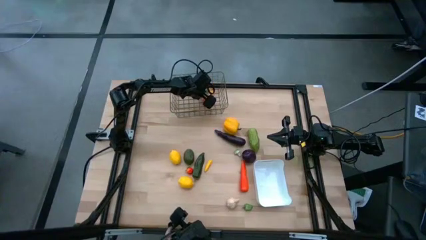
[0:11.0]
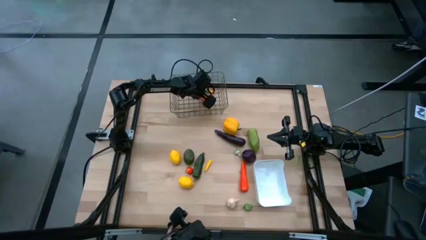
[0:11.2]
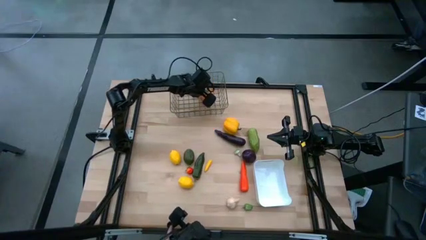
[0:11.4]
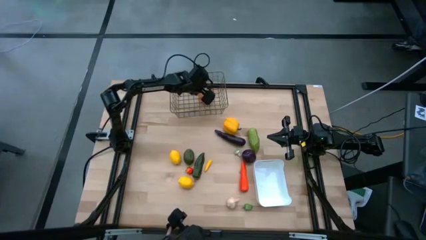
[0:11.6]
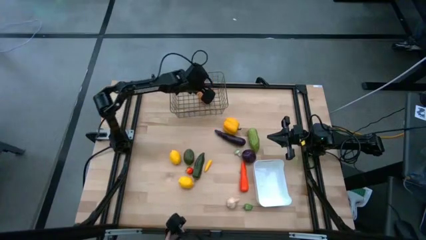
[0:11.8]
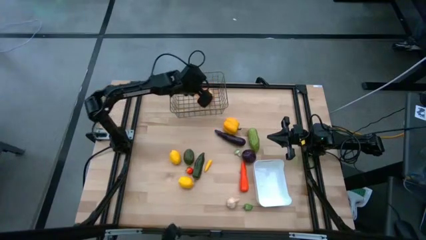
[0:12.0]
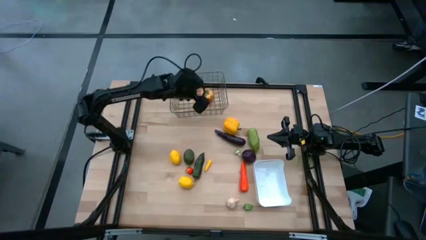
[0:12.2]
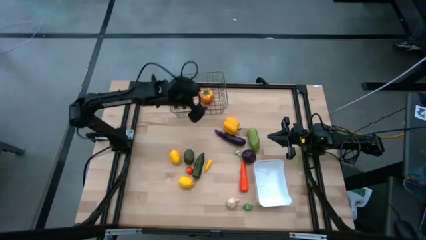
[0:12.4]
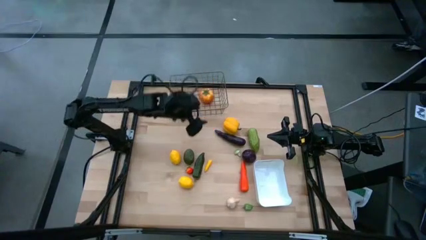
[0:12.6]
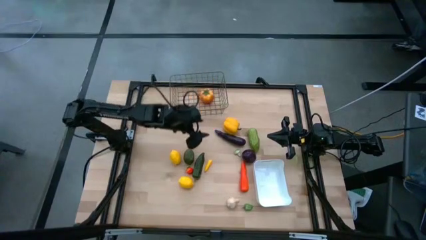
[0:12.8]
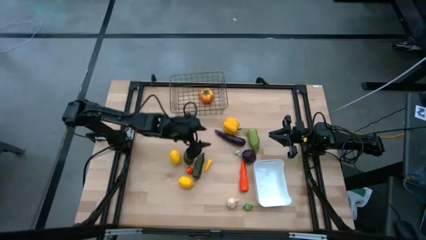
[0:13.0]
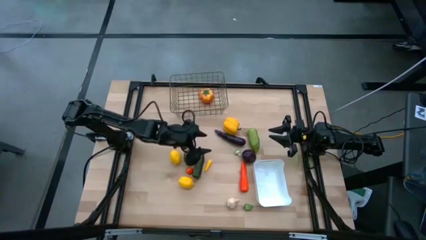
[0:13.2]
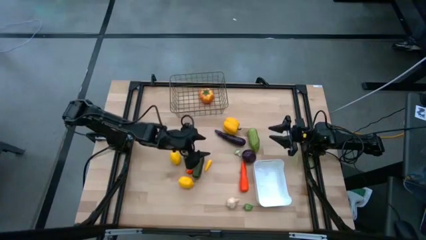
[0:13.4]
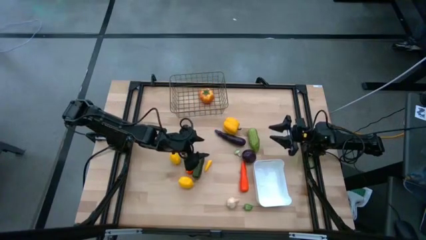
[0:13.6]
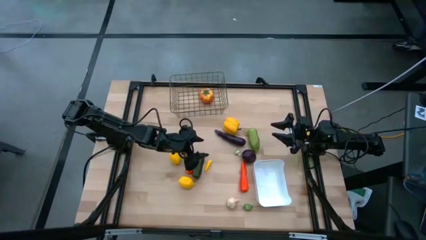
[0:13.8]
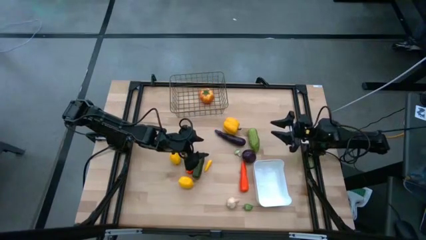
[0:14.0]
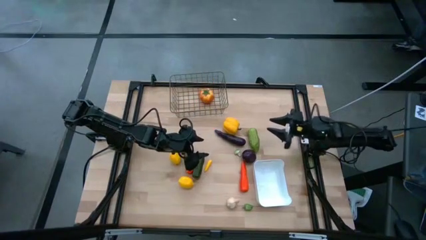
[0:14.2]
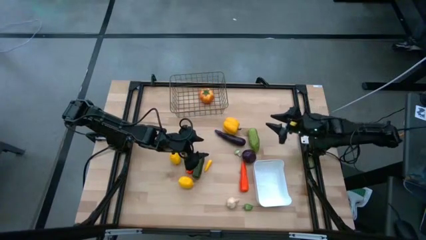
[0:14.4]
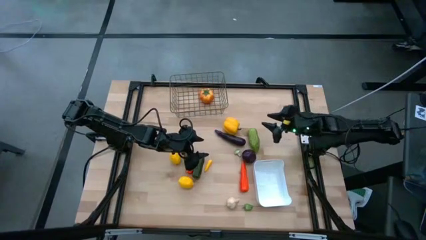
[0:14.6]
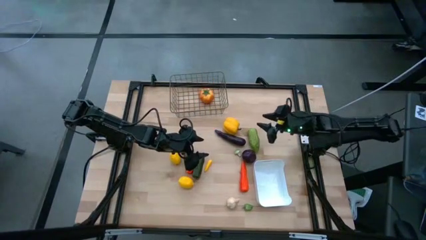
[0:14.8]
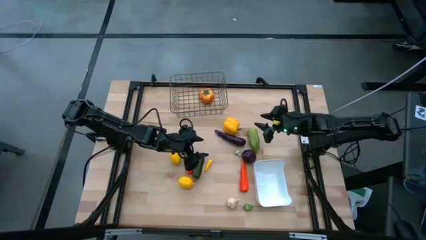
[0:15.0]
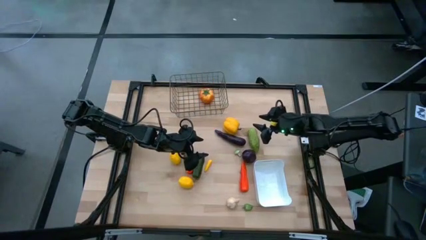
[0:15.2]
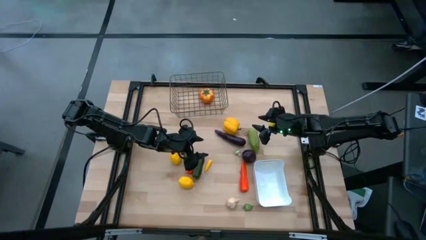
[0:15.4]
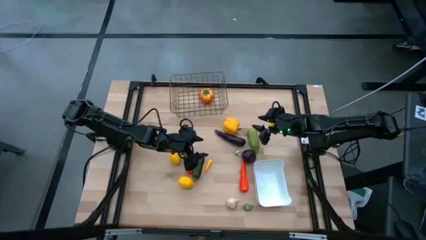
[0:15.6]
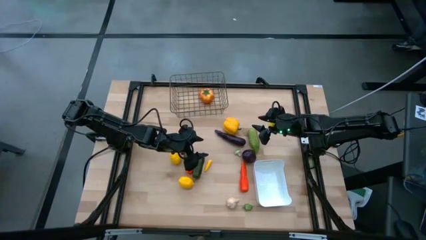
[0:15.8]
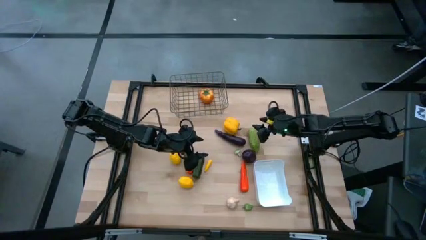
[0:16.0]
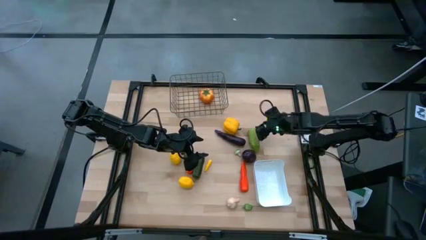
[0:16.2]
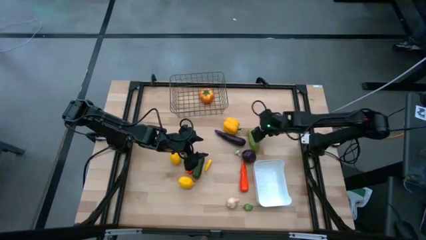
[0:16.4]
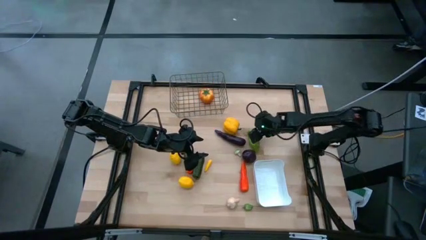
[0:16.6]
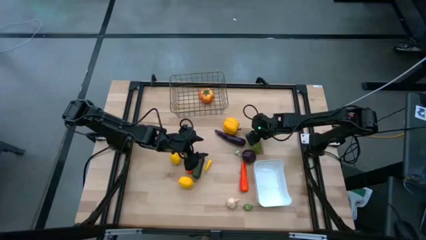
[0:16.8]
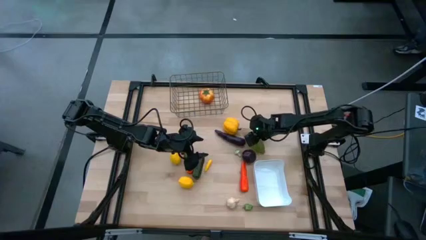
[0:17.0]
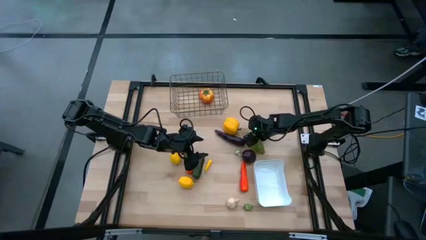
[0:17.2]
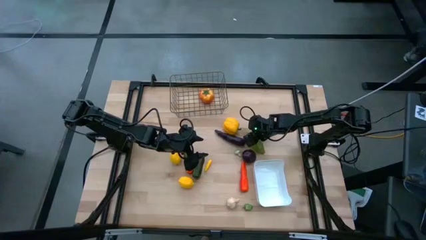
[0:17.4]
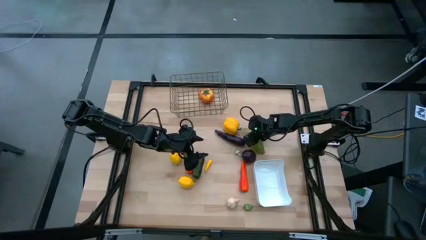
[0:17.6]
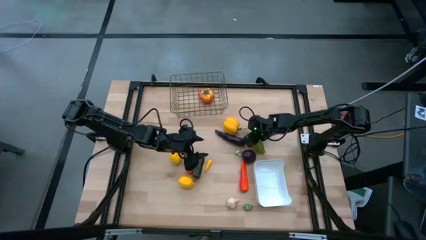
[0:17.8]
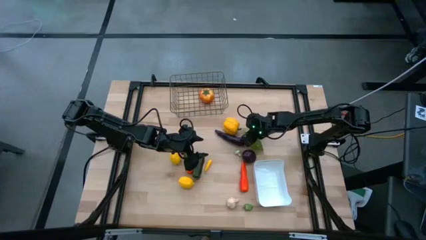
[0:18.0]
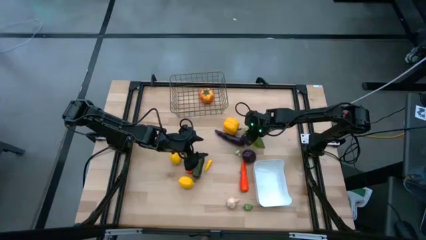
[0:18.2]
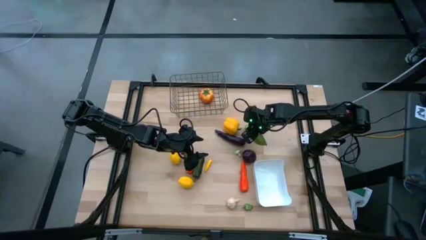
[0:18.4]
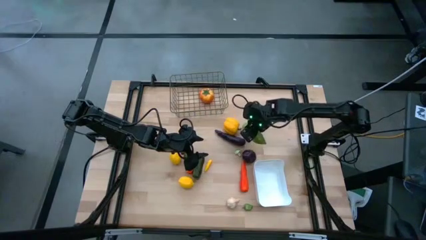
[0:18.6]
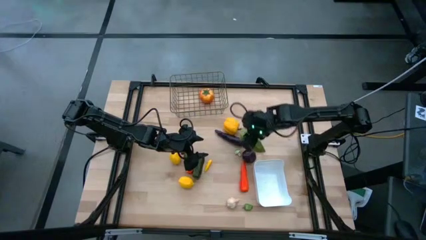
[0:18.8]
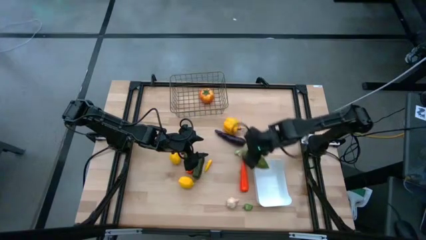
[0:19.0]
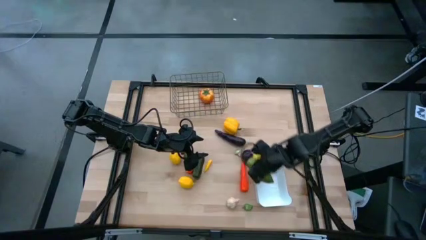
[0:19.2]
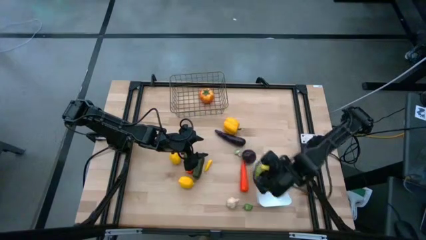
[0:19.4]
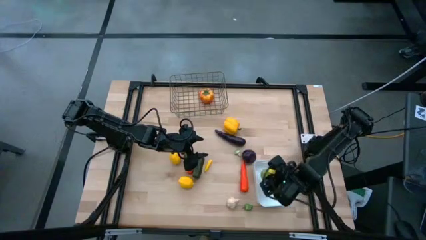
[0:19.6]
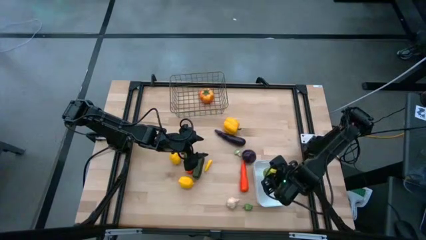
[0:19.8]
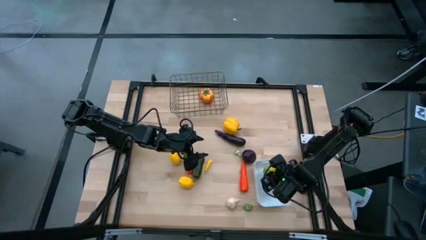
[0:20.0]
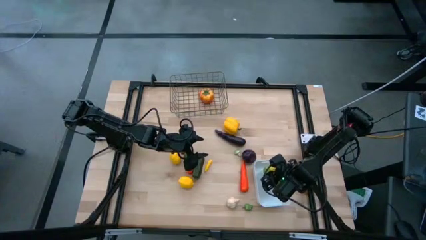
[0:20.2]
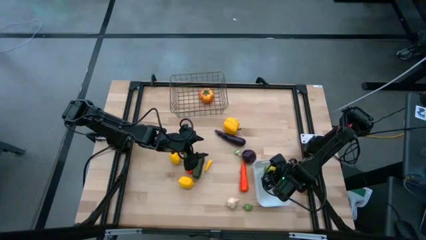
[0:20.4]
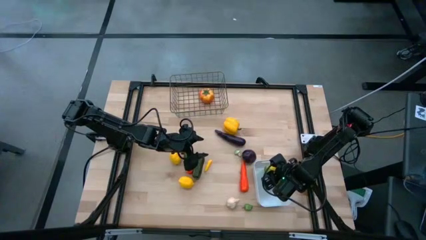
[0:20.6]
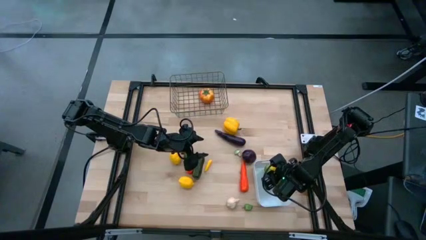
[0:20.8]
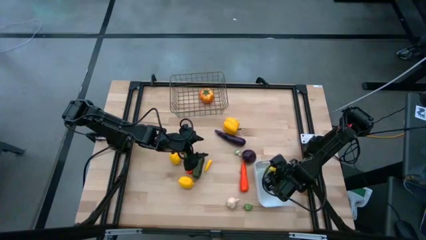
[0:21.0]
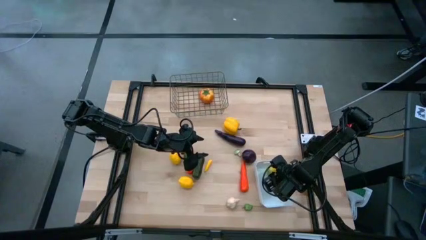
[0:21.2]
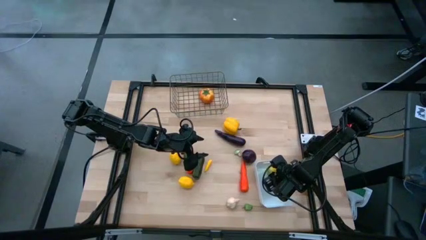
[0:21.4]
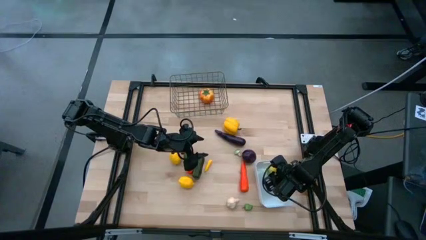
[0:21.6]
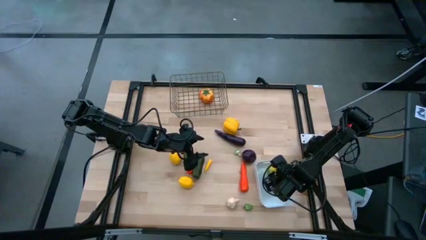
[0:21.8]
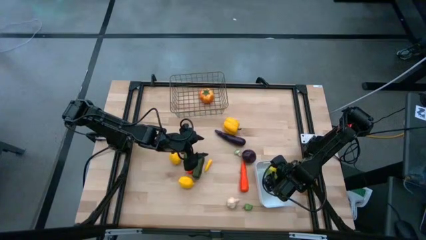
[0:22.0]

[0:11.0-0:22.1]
Task: Sort produce into baskets
Put the chayote into the white bin

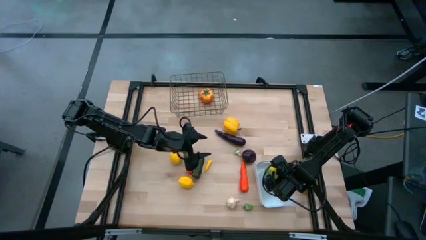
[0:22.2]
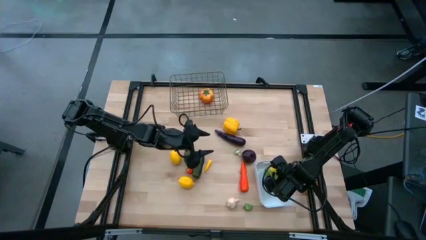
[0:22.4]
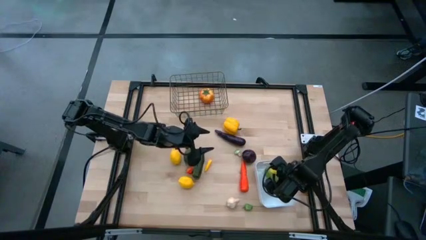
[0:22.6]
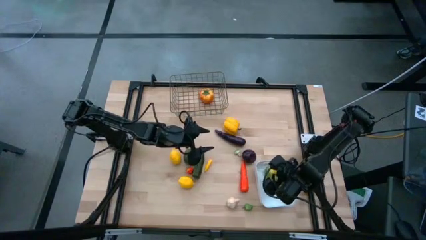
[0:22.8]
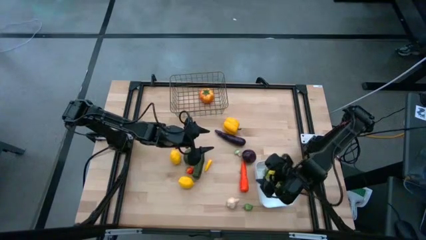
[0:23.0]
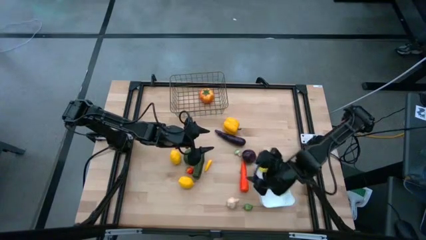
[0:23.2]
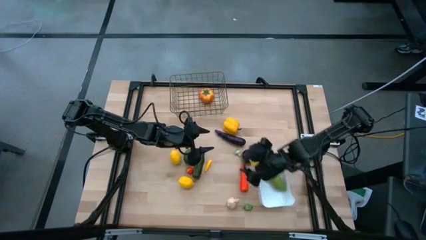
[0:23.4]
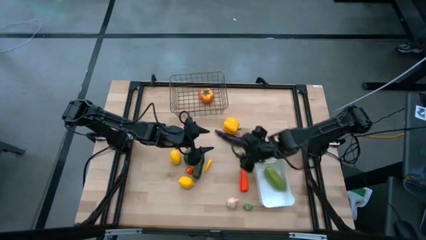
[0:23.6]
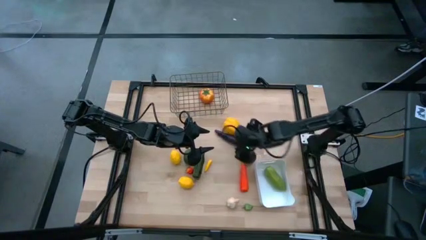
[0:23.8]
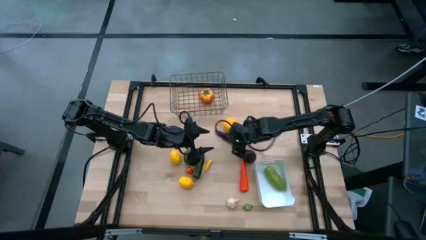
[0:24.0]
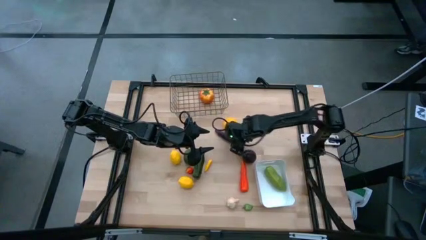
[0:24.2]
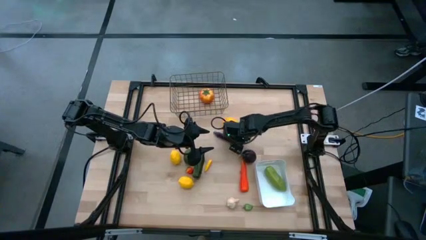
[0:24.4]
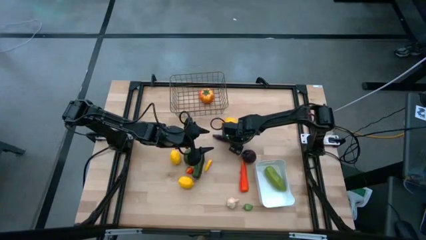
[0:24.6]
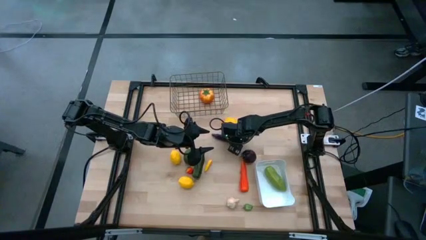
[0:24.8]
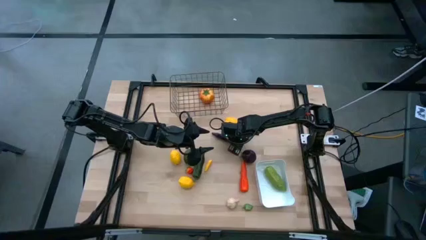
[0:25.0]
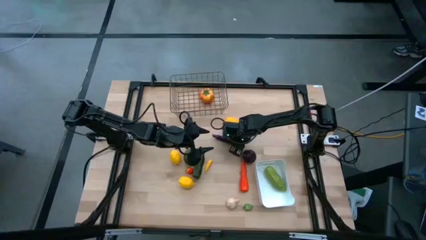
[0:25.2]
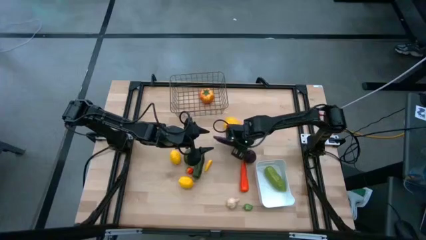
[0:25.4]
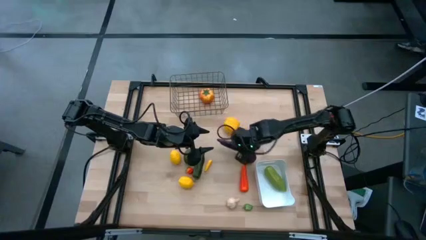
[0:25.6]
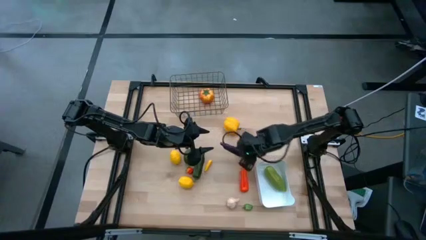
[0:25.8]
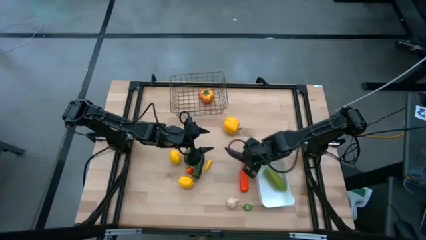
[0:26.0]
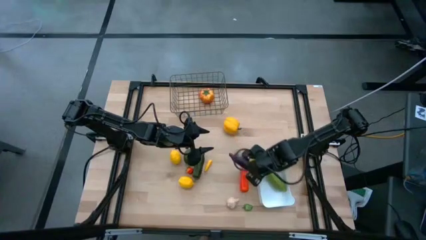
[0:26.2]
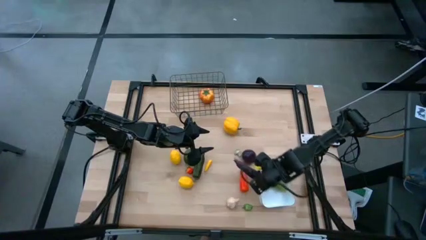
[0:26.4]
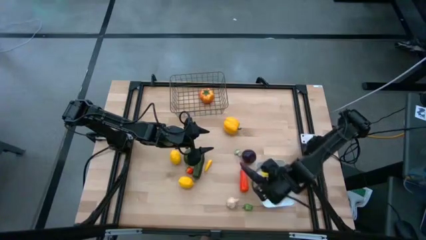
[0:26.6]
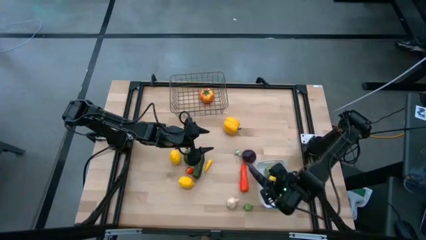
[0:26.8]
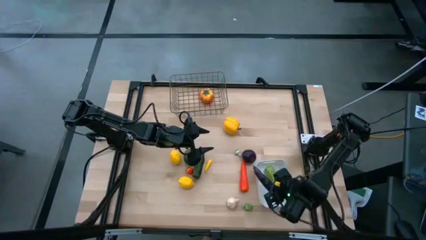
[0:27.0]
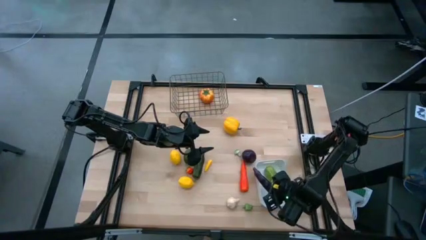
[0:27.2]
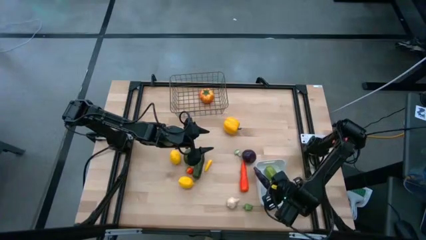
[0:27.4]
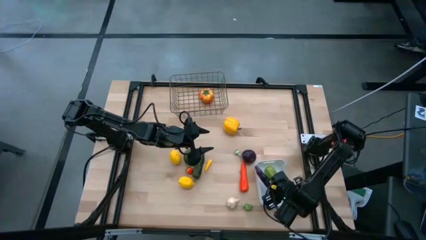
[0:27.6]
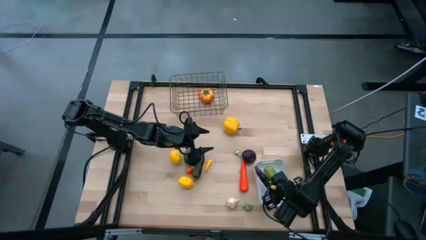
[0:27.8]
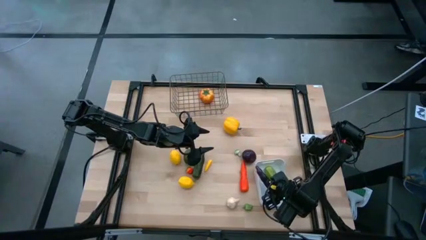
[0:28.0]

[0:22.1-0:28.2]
Put the eggplant into the white bin
